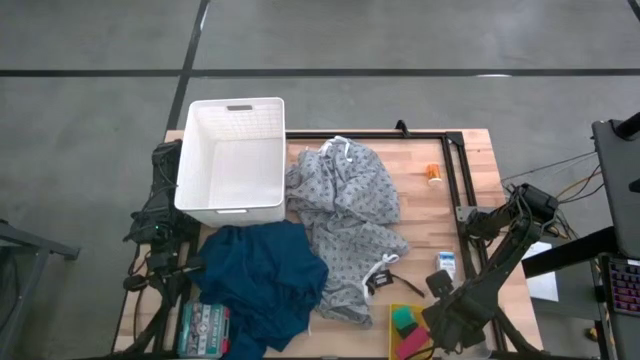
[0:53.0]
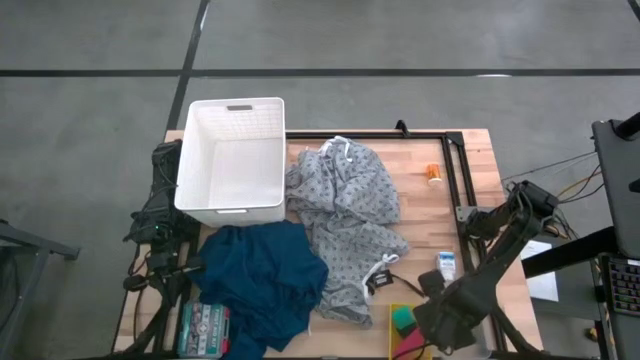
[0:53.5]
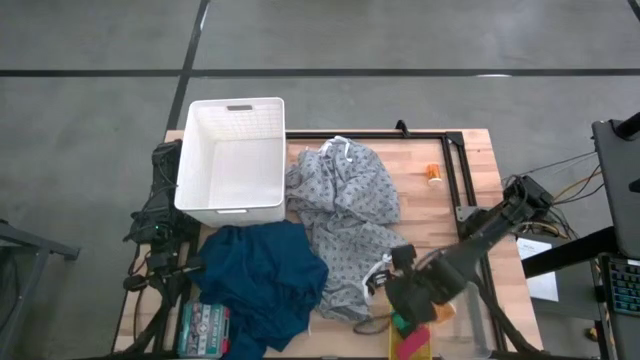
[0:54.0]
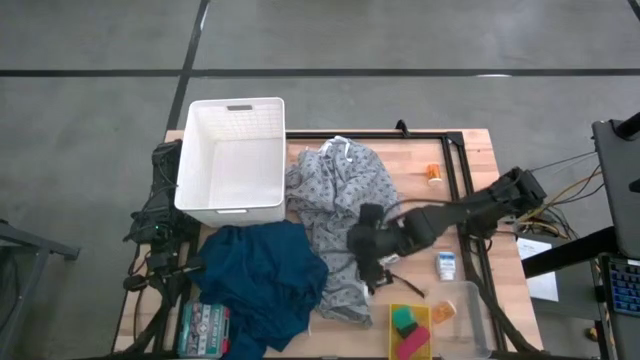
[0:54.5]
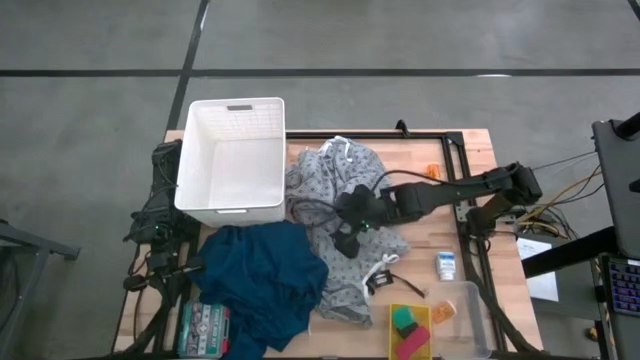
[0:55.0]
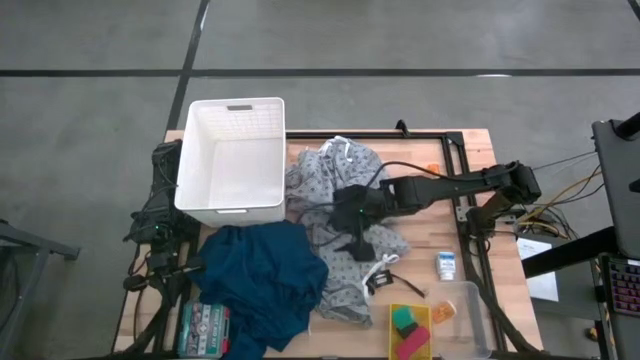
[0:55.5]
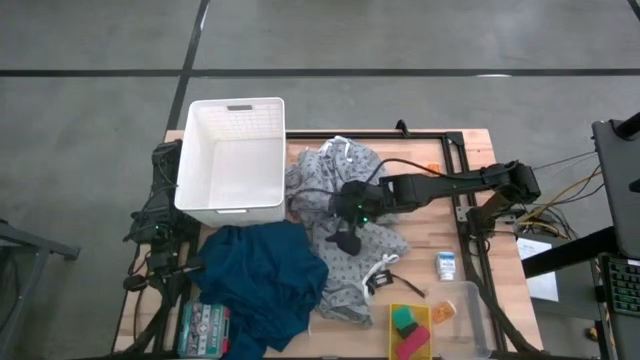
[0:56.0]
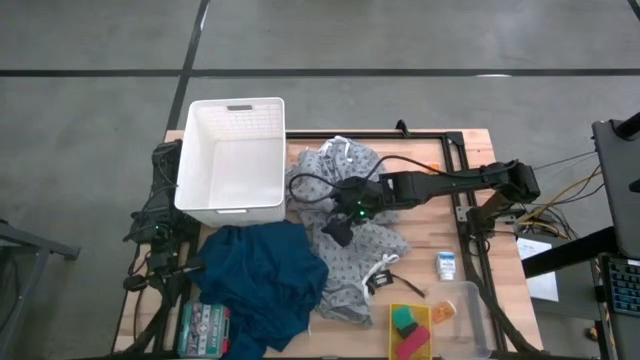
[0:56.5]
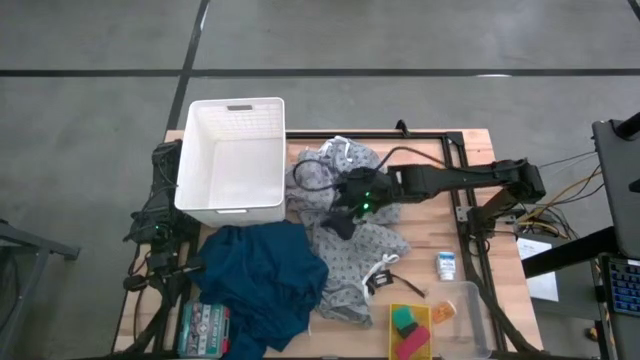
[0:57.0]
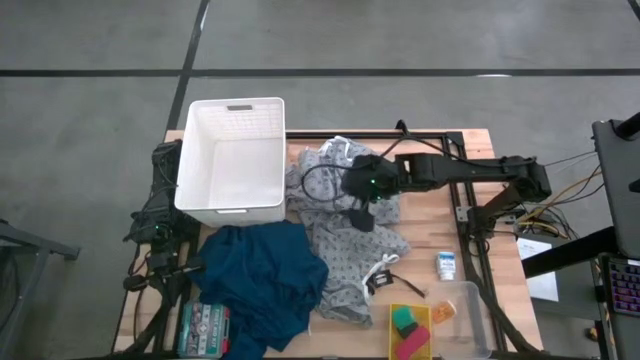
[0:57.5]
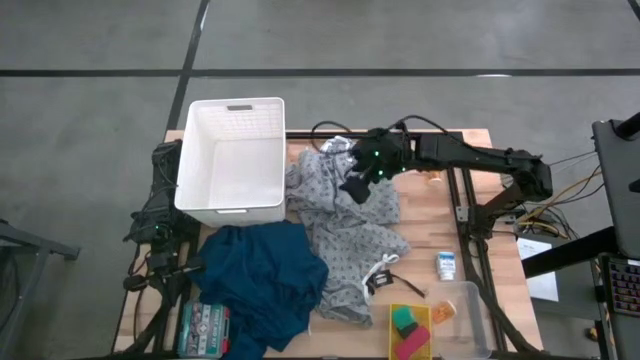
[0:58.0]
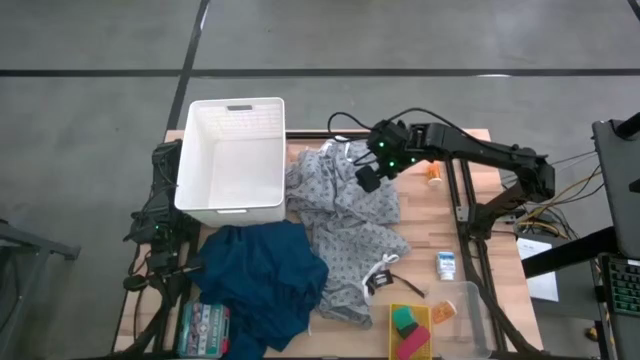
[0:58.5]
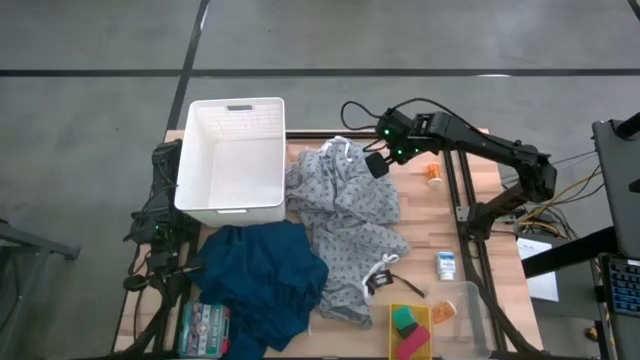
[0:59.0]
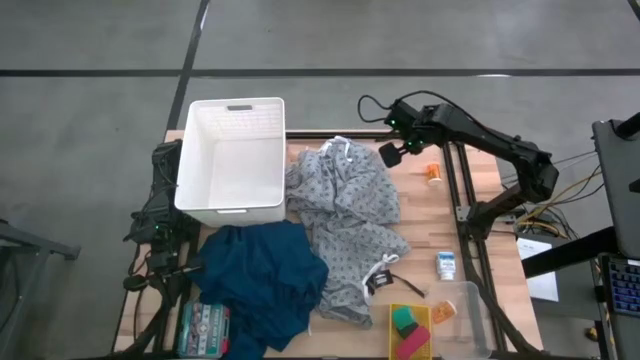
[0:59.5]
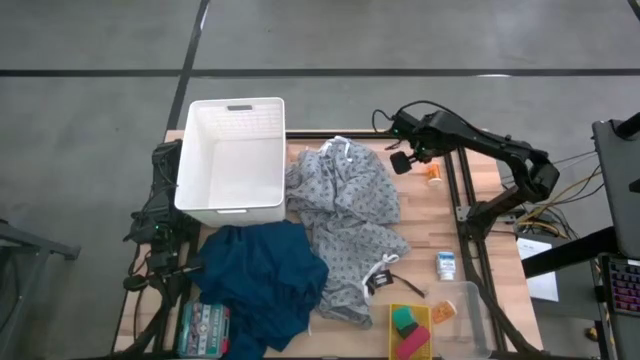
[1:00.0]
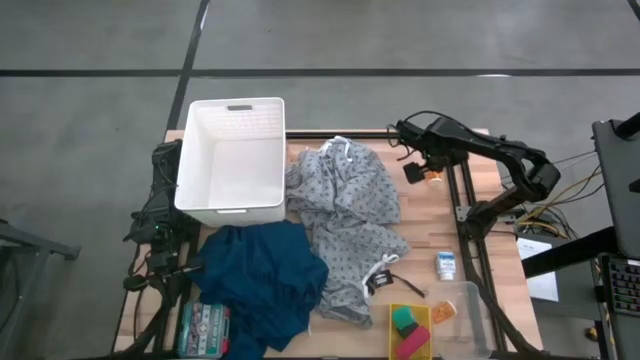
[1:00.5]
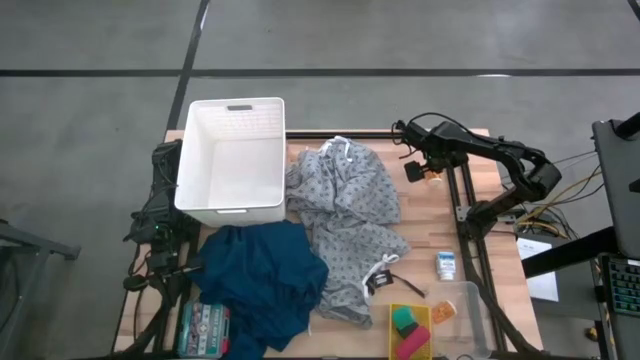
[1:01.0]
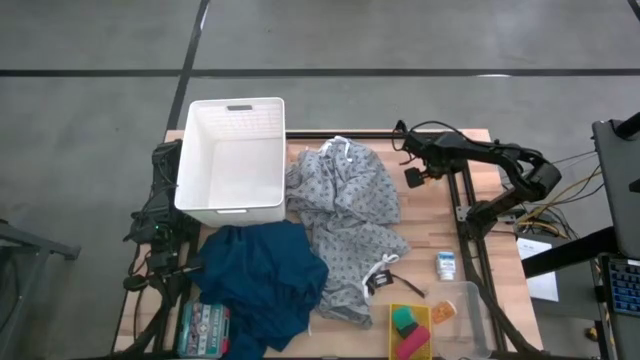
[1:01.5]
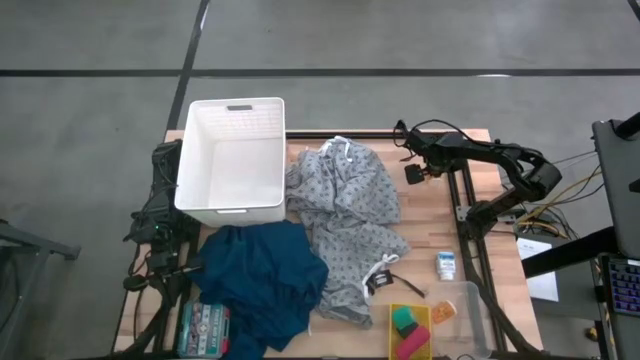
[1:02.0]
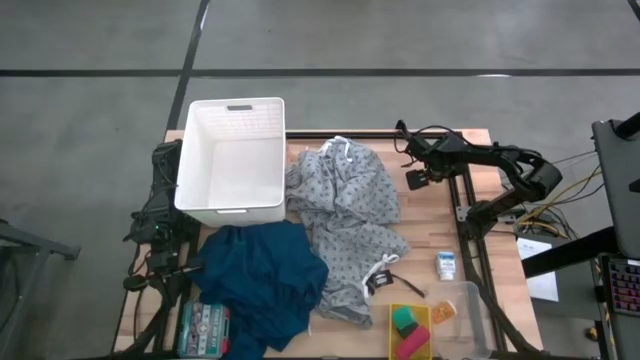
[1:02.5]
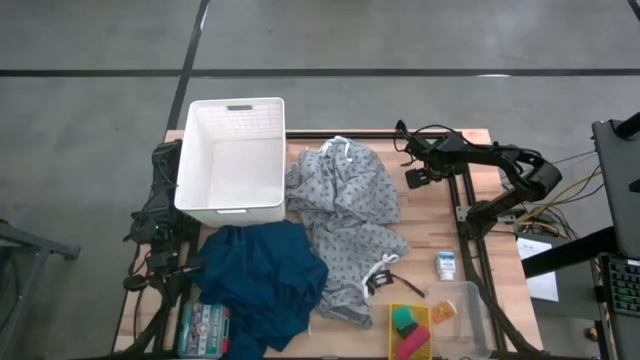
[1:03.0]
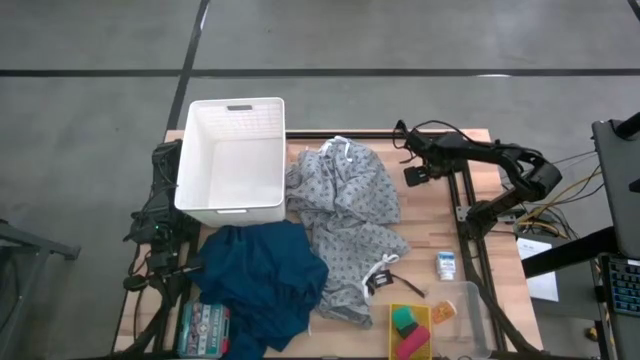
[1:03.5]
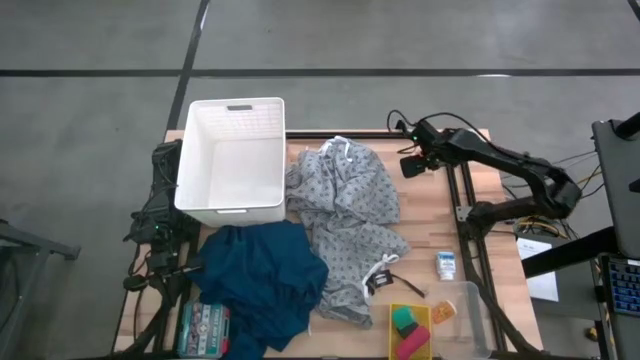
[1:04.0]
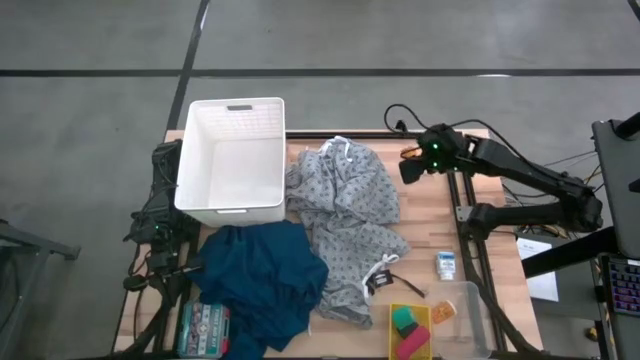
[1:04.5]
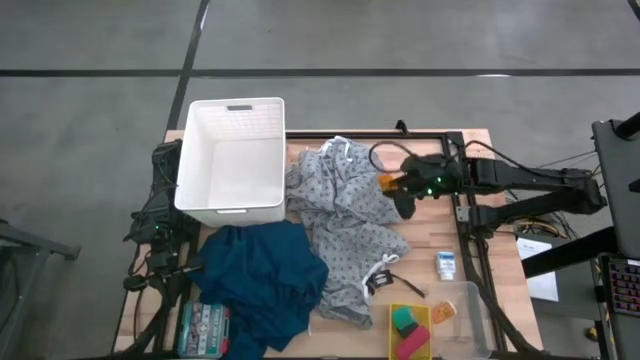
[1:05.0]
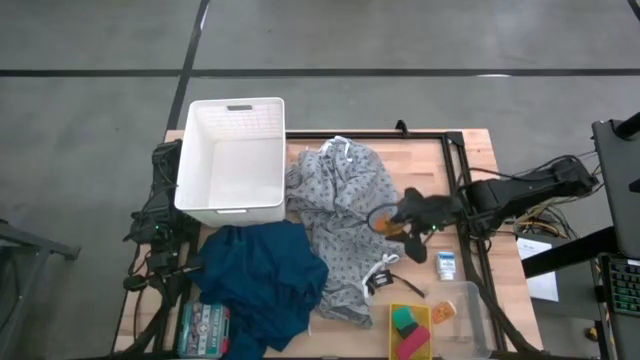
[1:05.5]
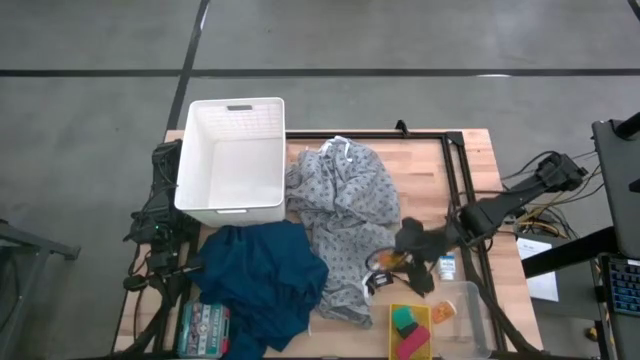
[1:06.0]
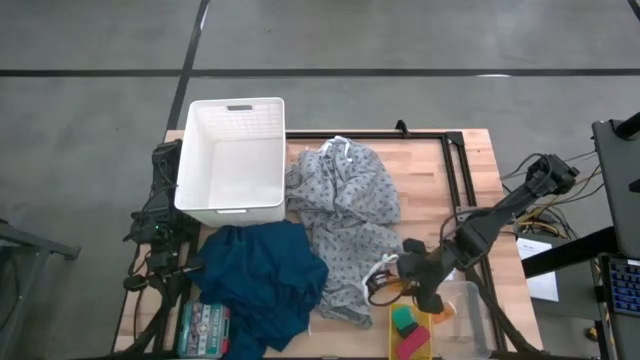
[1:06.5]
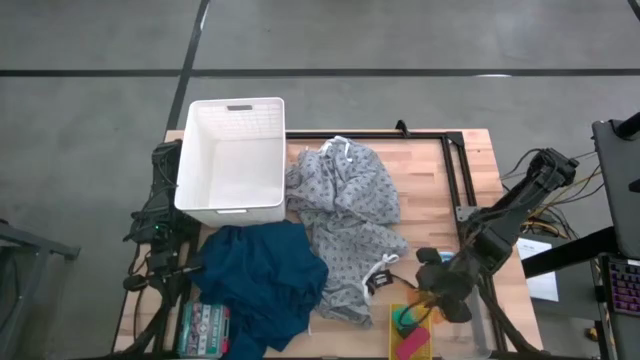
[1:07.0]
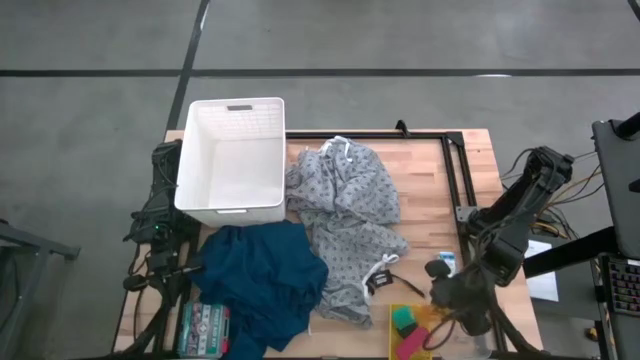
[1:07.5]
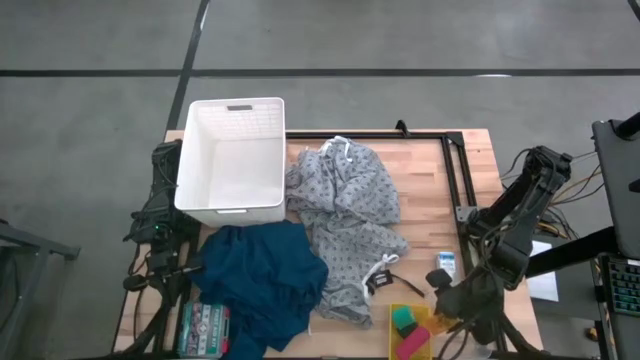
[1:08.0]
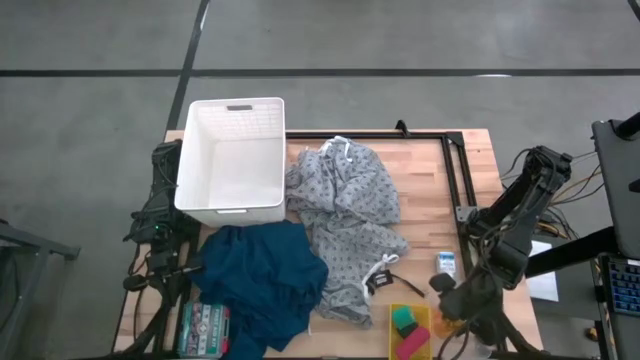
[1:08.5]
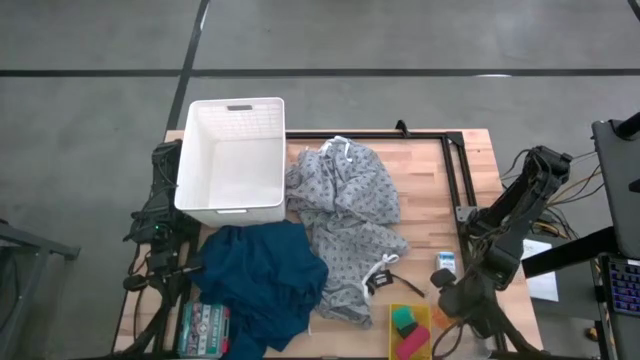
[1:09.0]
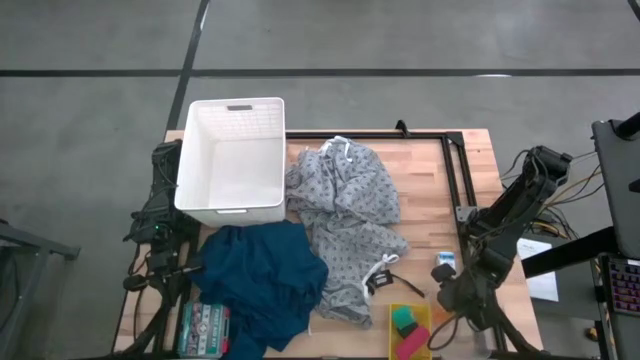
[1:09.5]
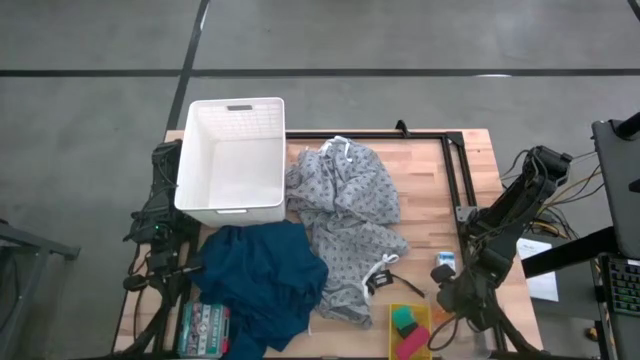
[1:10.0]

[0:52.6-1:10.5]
Task: Pick & Place Medicine items
Put the orange pill bottle into the transparent bin

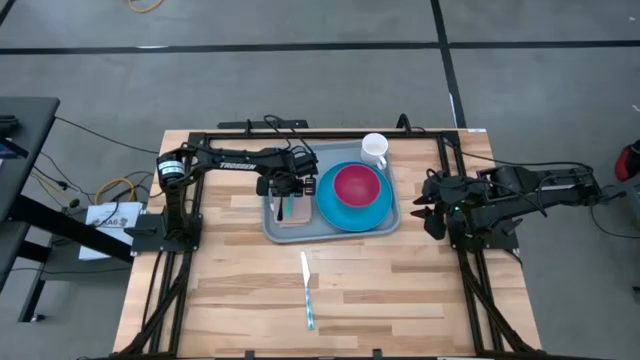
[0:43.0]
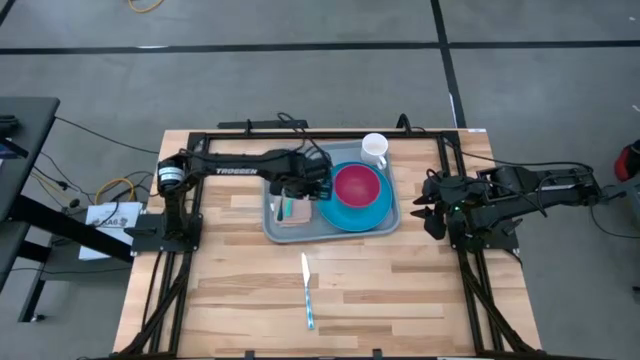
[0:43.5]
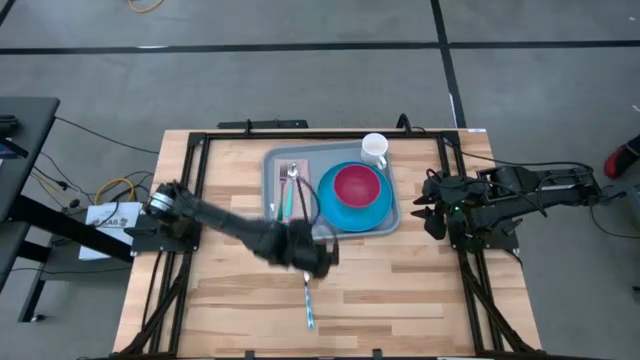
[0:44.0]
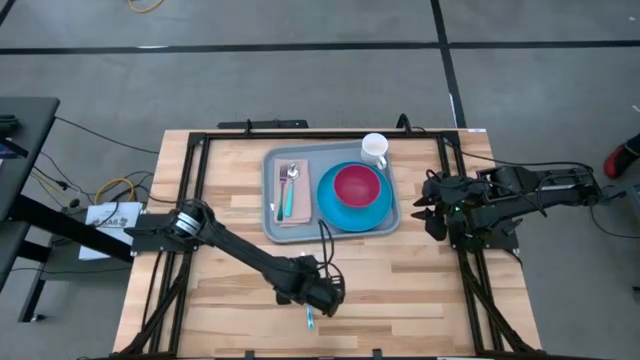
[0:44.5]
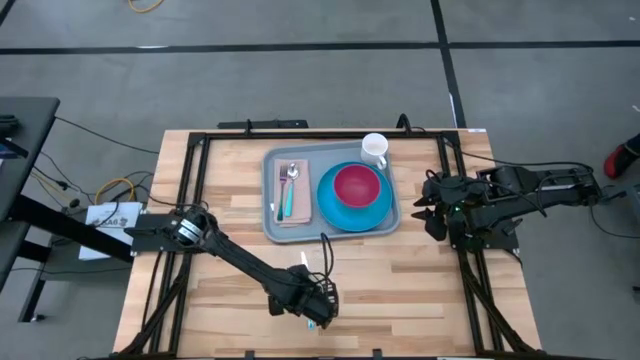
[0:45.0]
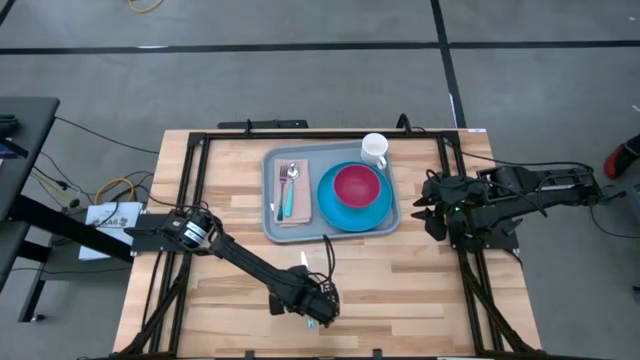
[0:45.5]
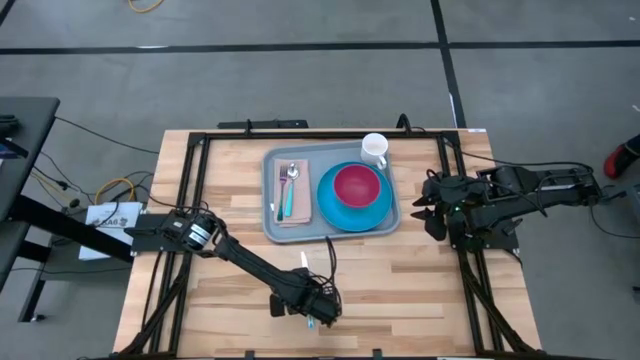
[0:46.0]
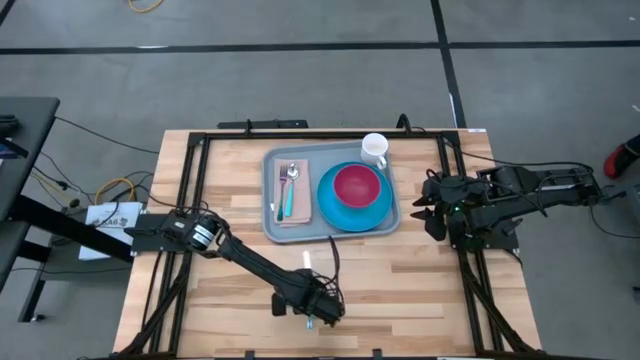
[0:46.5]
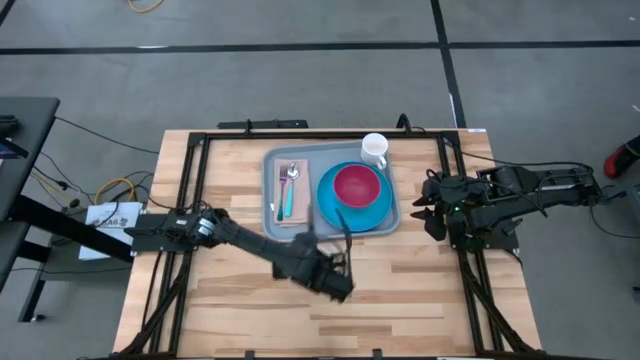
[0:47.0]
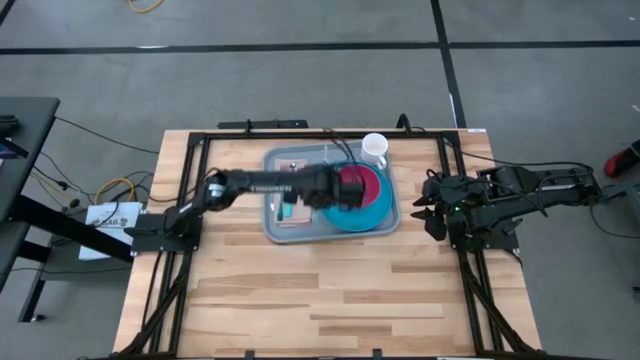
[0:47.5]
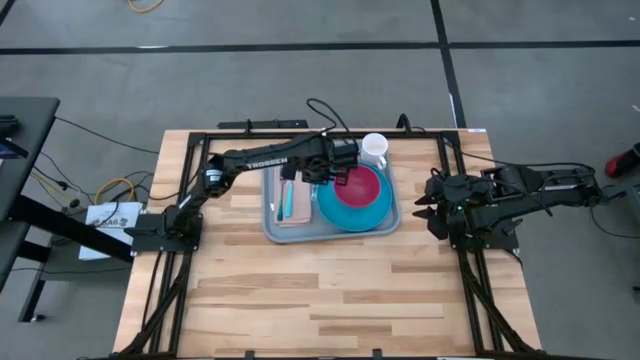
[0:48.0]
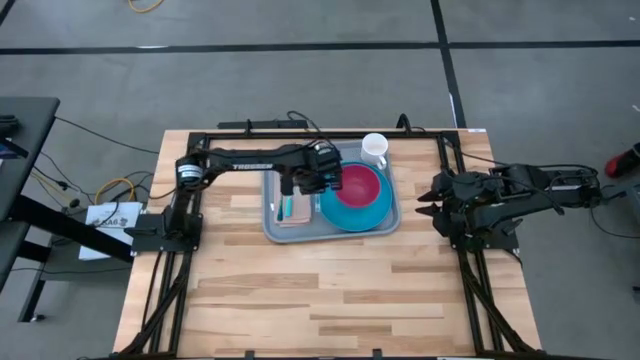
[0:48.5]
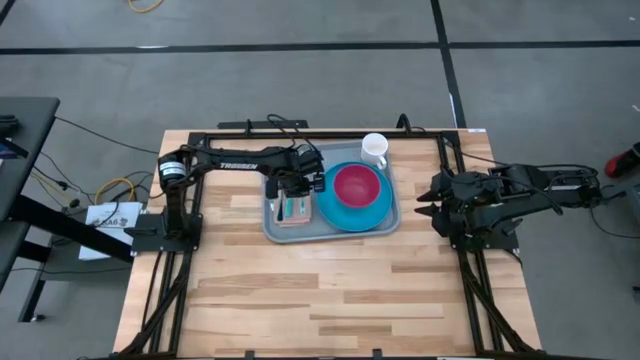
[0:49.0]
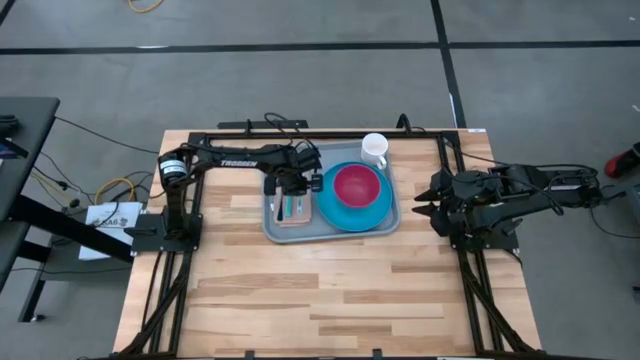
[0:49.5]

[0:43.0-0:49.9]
Task: Set up tray
Put the knife on the brown napkin to the right of the blue spoon on the blue tray
